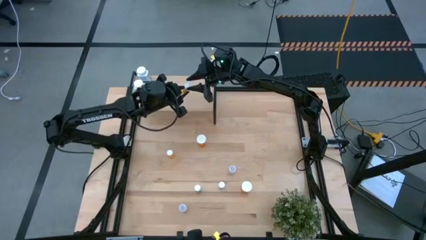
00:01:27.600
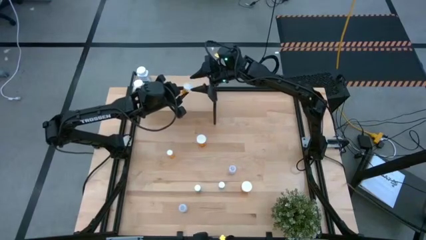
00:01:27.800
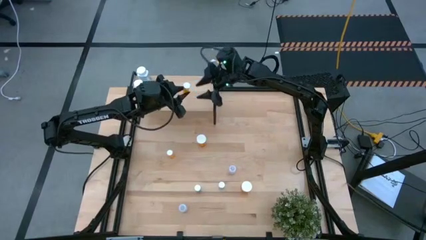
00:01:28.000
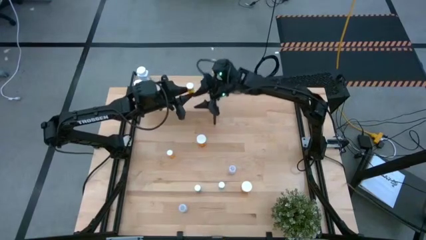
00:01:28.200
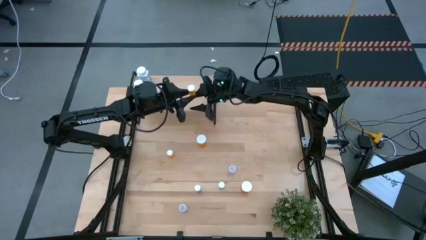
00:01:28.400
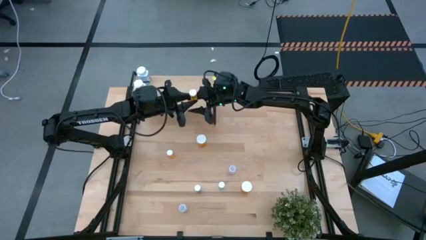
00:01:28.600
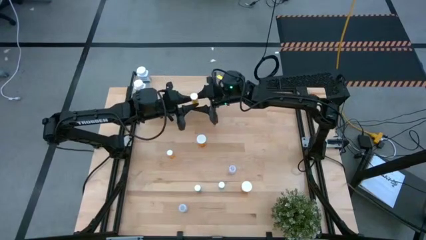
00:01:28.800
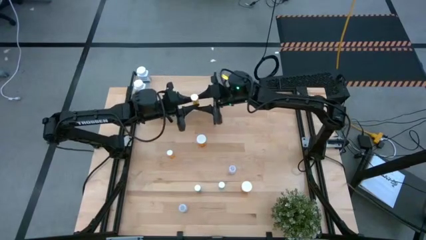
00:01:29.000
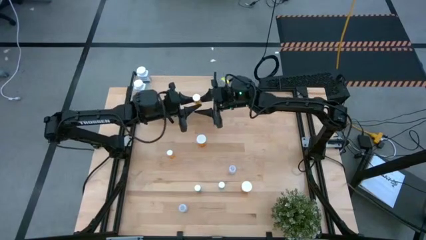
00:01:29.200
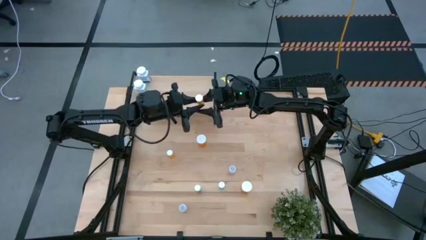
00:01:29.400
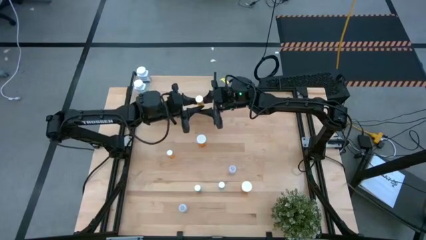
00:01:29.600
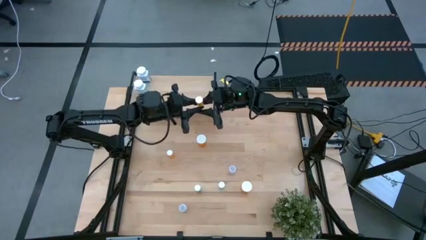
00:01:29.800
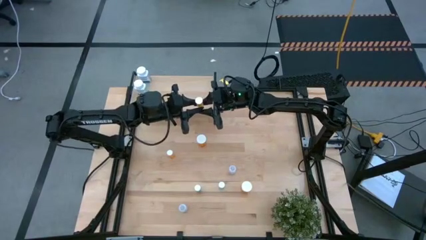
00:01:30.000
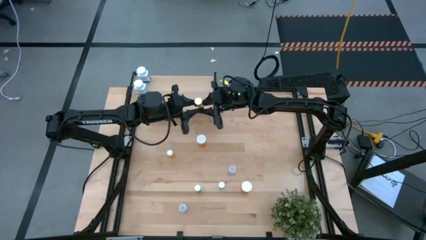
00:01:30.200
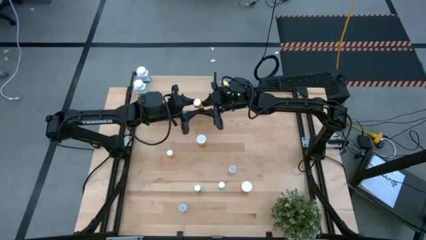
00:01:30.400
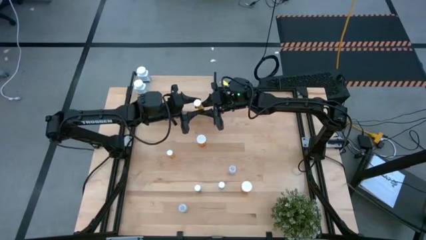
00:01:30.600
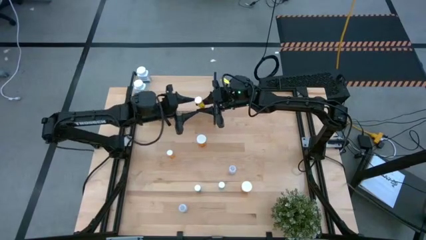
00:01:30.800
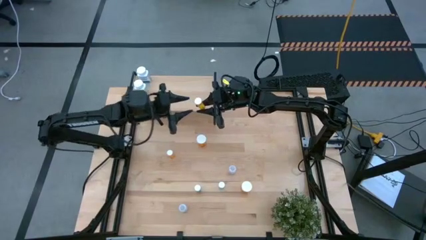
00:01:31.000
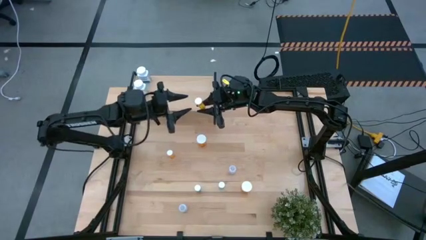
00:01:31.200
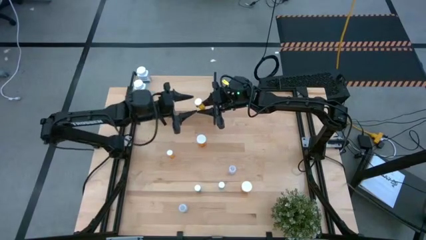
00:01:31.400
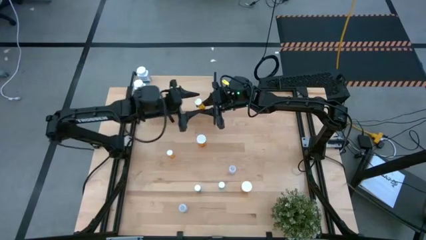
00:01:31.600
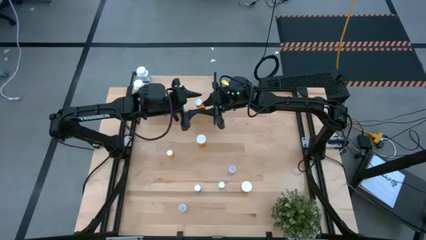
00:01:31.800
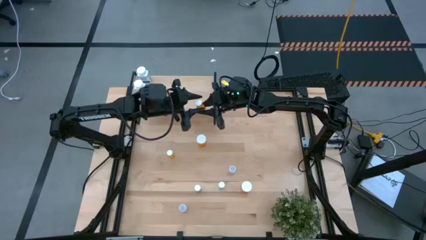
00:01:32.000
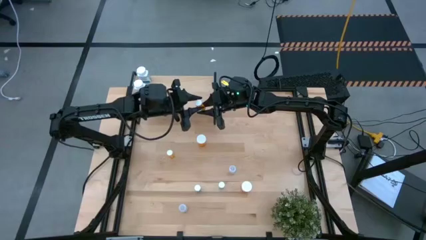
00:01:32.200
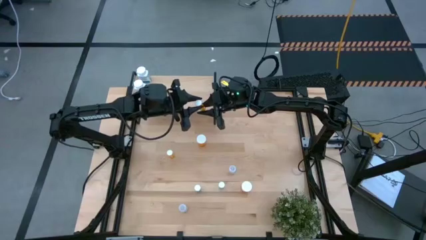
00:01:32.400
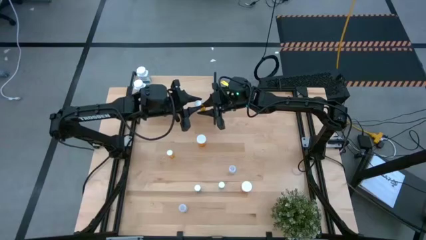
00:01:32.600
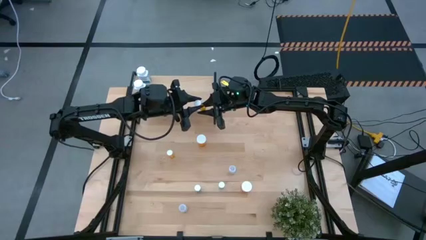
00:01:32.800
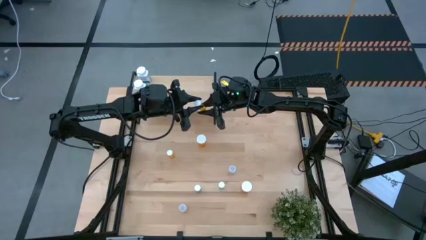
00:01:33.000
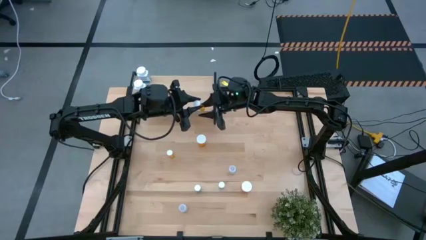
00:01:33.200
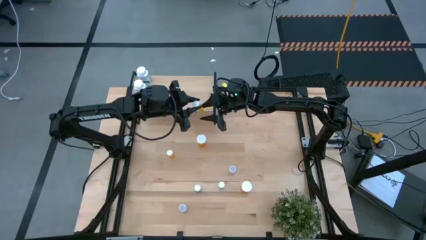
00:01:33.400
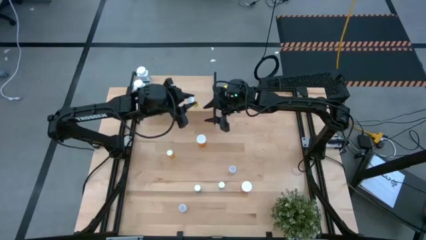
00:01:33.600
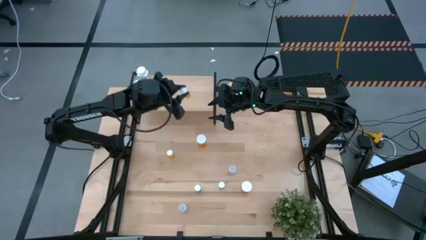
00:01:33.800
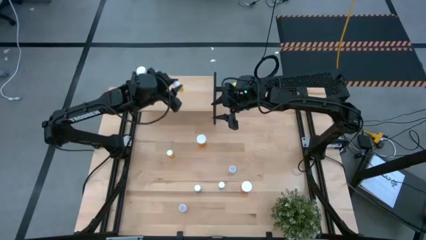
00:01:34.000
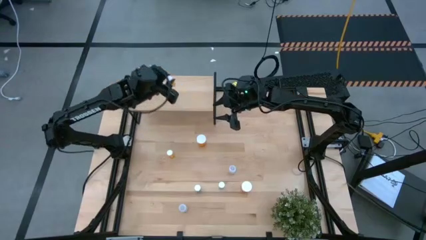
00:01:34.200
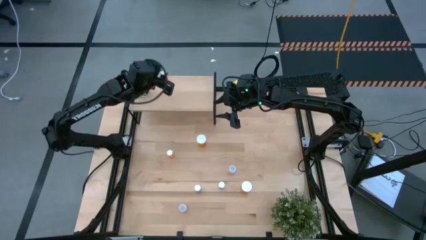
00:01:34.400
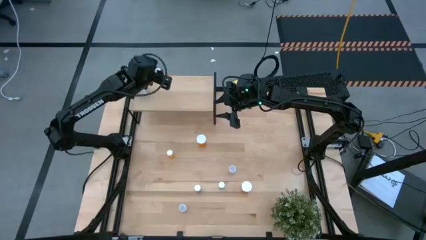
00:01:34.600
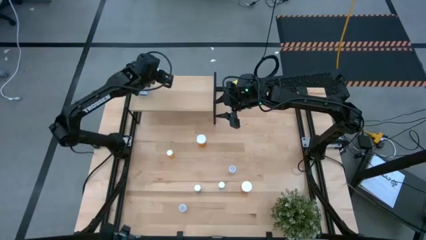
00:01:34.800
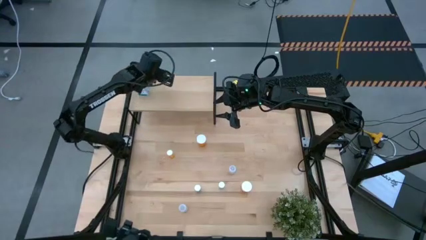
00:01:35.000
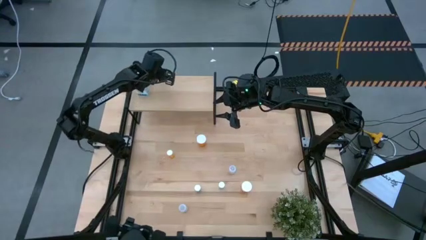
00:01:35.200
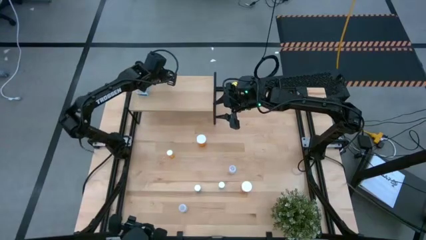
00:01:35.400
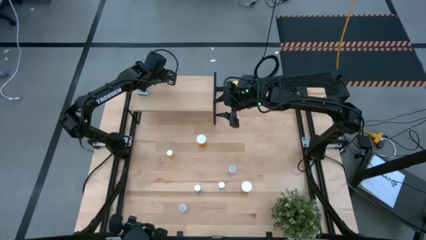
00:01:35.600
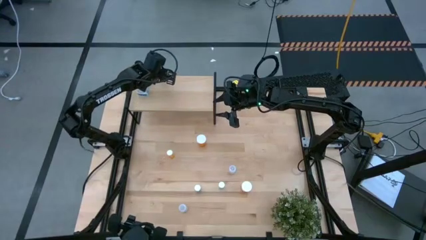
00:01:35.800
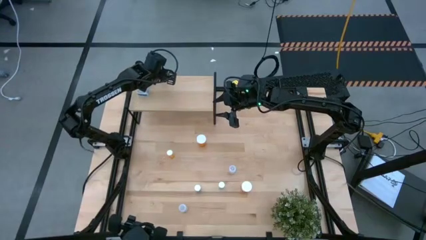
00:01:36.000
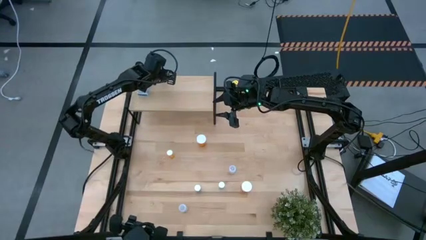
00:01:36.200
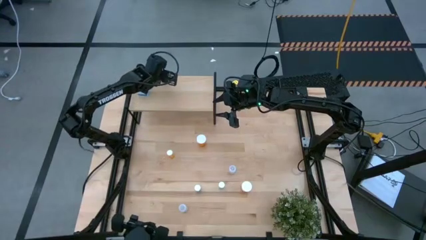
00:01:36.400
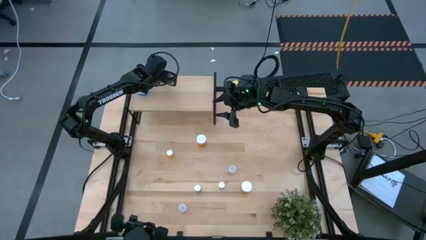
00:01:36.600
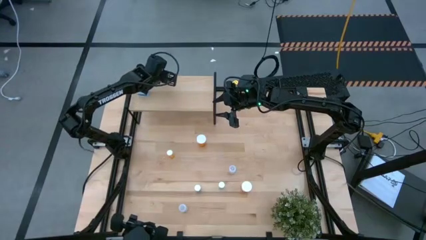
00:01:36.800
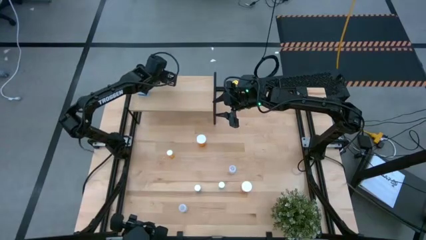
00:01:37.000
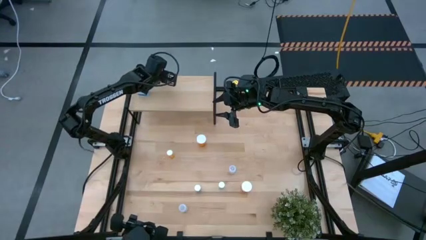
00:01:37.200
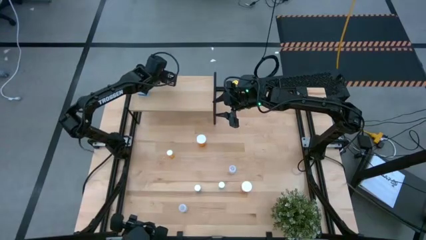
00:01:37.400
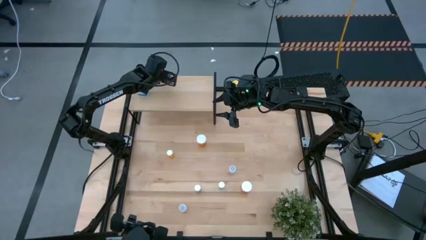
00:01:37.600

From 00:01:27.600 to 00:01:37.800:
Task: Pick and place medicine bottles onto shelf by color
Put the right small orange pill bottle on the shelf

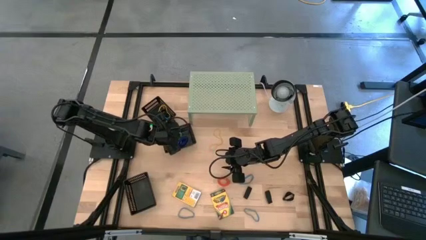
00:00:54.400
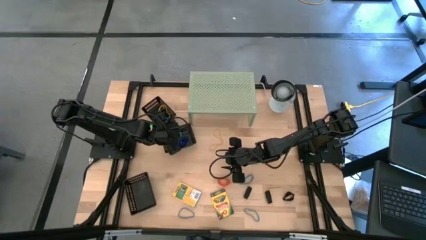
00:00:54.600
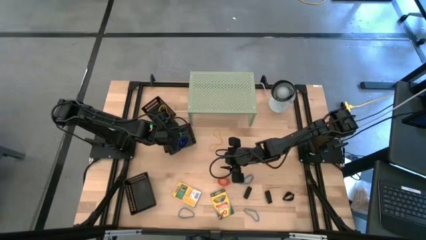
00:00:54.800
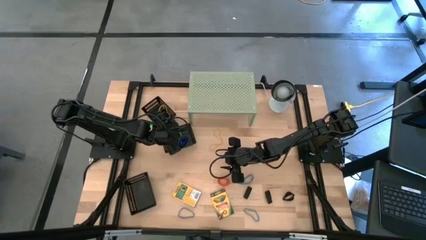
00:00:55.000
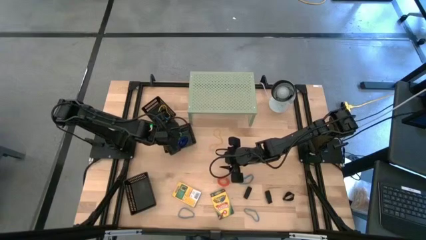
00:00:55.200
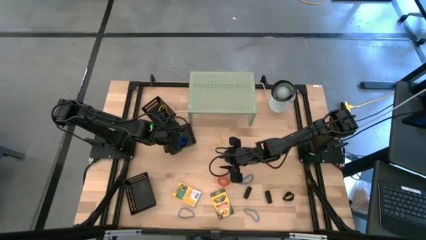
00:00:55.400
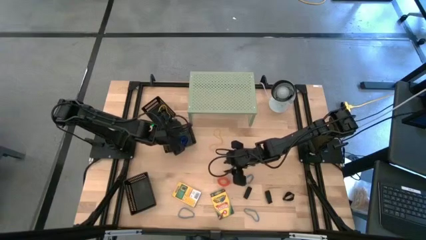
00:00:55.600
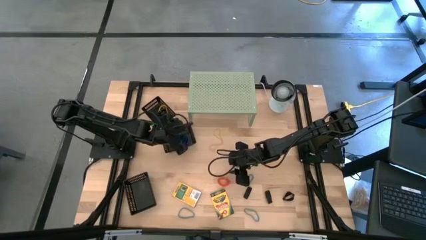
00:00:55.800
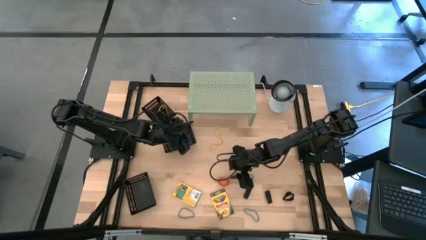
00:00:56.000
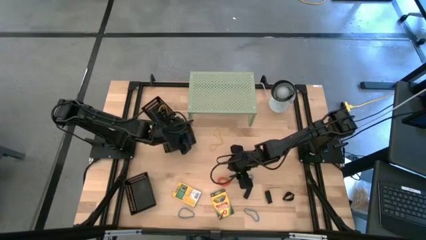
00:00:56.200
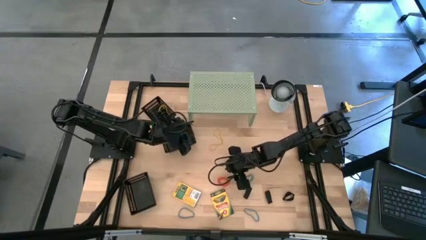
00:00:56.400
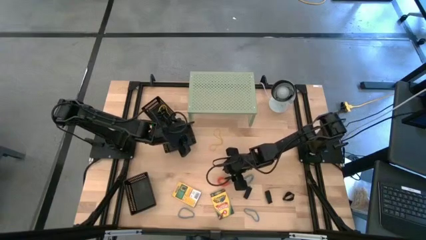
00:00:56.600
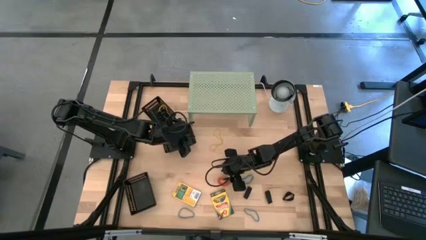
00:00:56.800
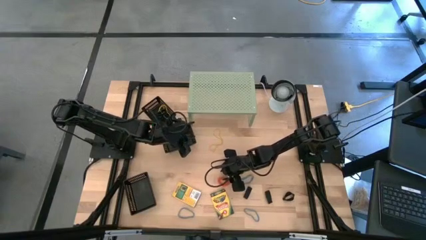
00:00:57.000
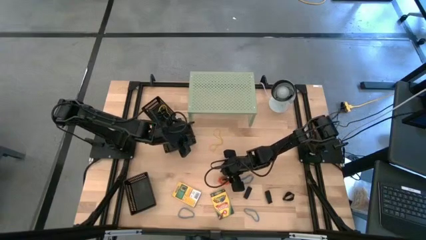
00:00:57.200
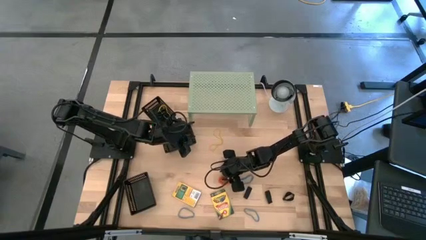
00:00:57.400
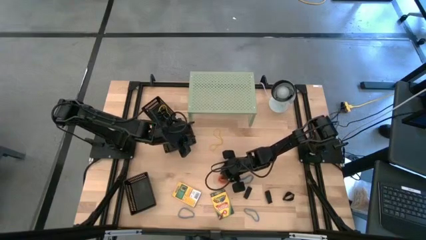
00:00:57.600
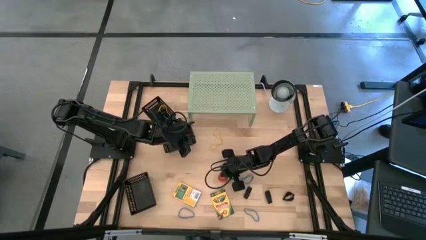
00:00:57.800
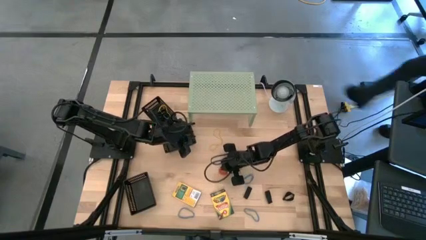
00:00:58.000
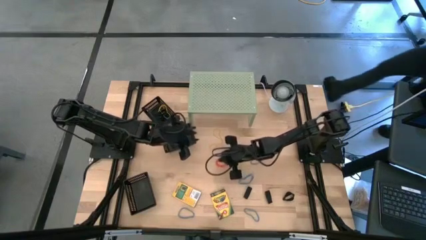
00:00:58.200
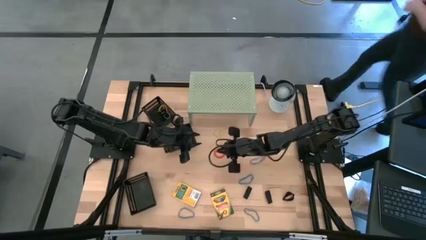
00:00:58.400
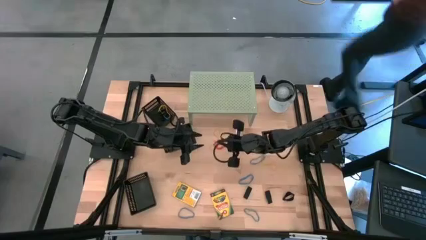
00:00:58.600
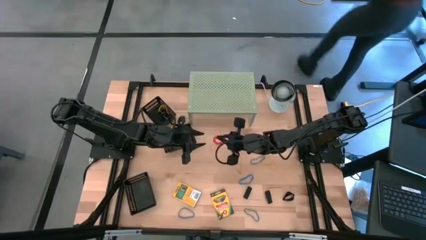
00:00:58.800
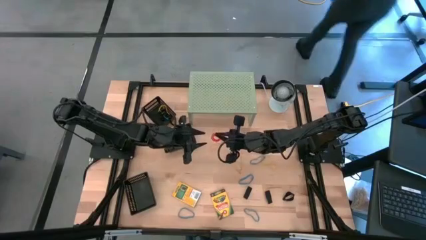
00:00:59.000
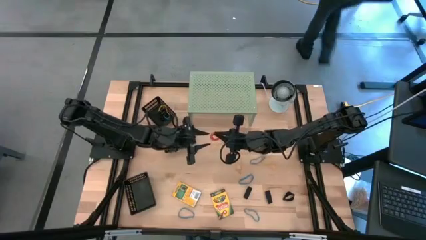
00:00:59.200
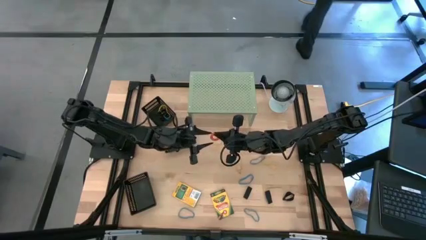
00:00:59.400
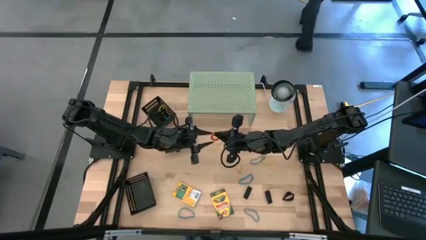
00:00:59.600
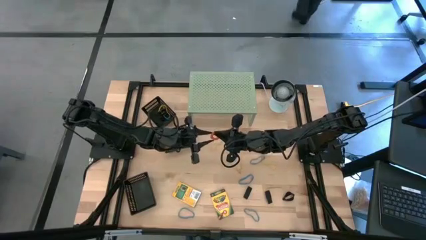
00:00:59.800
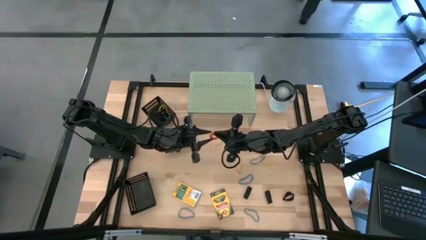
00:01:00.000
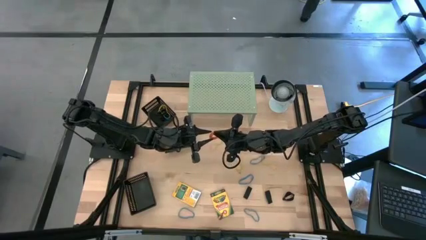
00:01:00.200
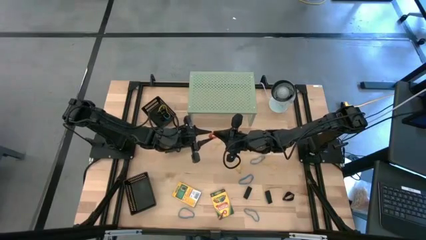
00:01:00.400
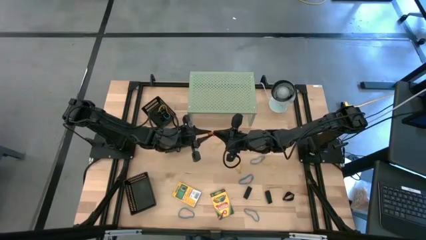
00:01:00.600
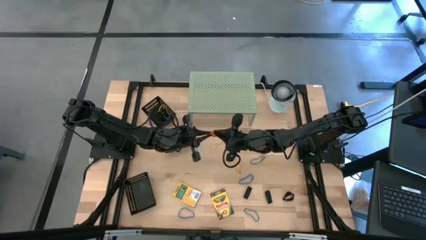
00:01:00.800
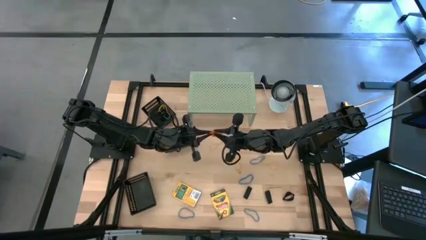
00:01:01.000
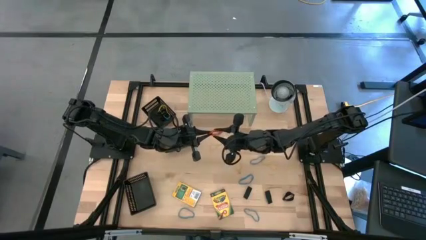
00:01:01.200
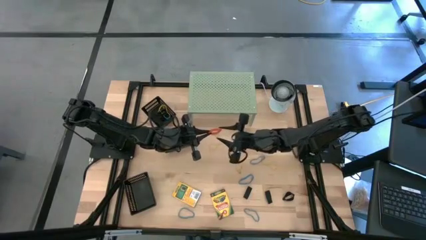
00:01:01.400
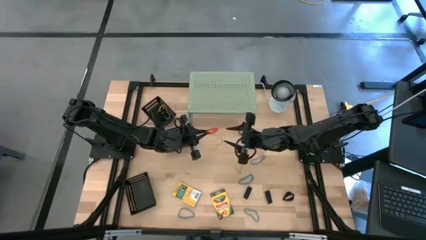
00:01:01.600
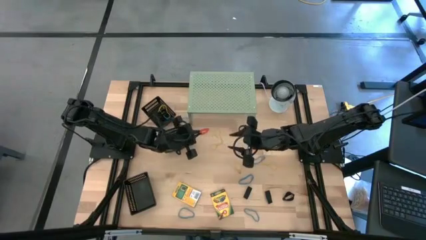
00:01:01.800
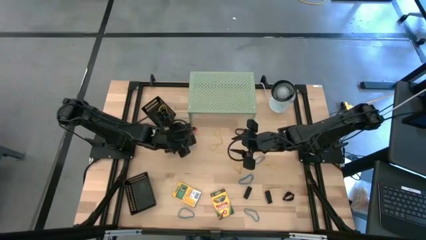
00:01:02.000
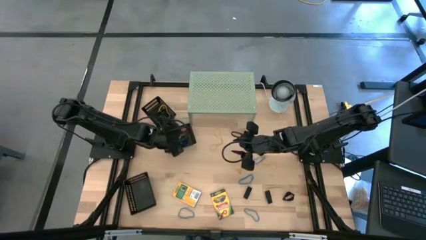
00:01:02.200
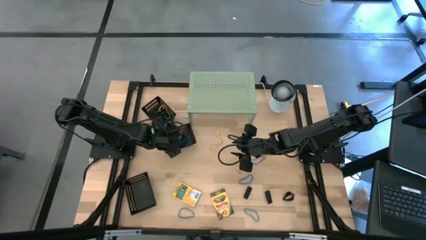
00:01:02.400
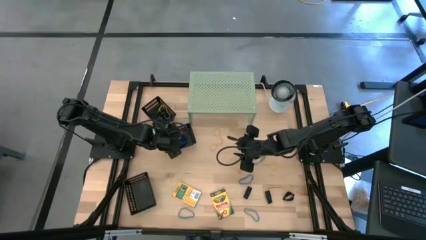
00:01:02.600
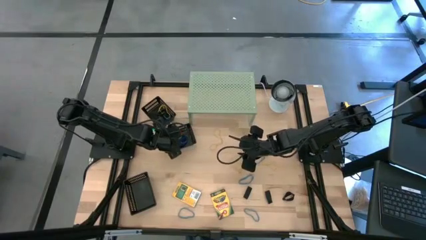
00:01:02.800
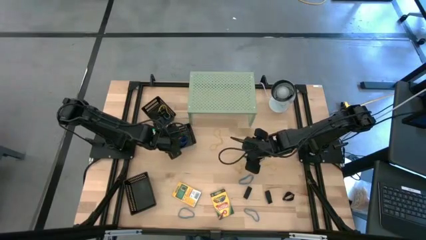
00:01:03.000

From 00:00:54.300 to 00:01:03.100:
Task: Pick & Place Office Desk Supplies
Put the orange spring keychain into the middle black bin
